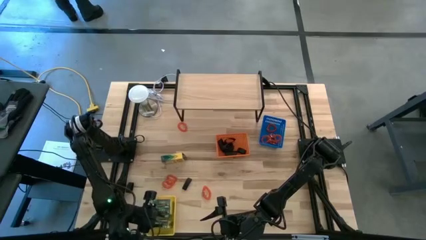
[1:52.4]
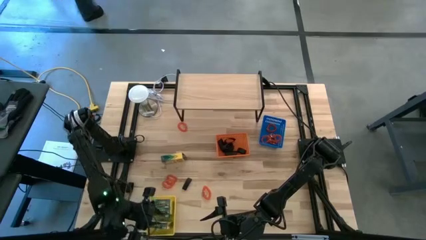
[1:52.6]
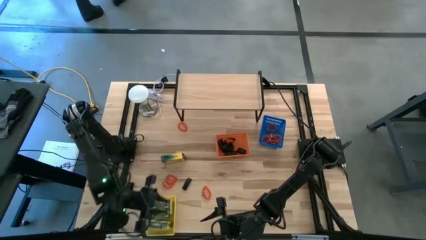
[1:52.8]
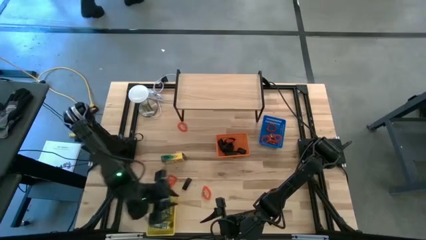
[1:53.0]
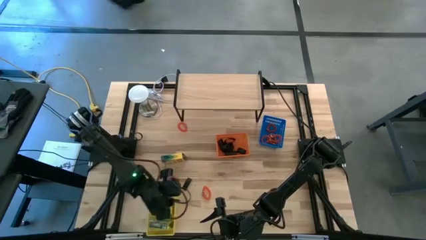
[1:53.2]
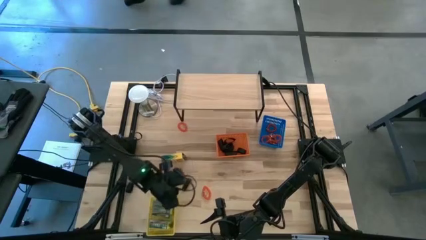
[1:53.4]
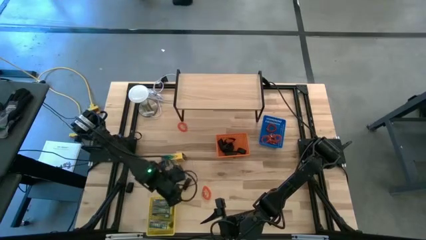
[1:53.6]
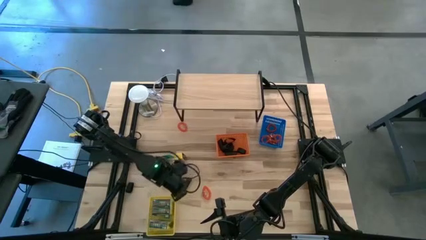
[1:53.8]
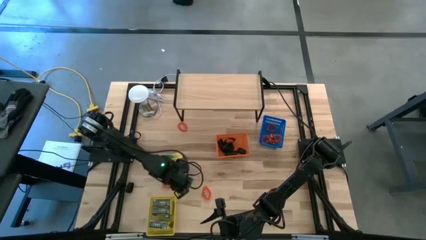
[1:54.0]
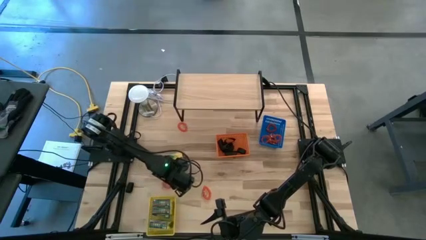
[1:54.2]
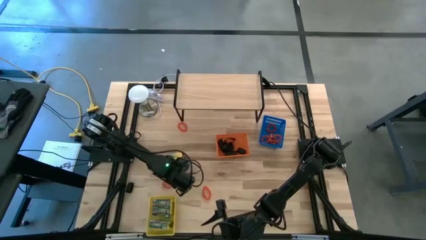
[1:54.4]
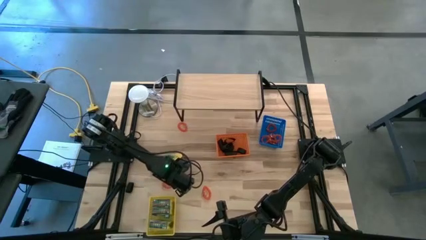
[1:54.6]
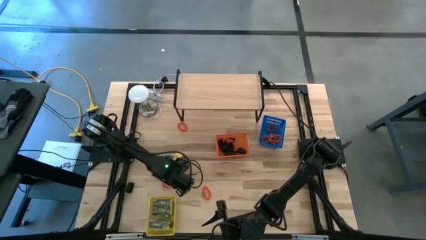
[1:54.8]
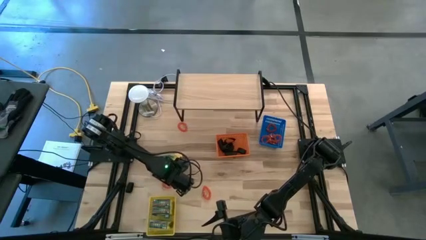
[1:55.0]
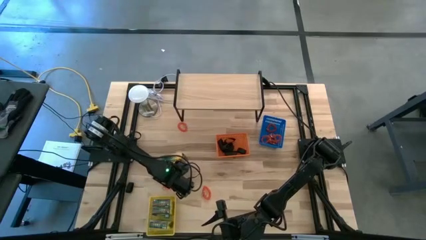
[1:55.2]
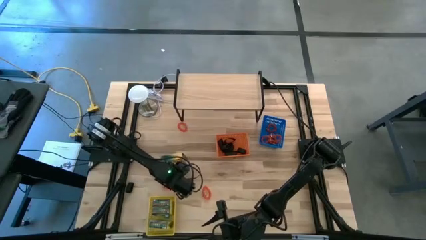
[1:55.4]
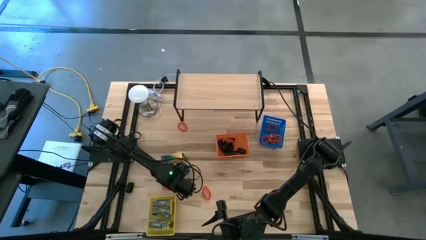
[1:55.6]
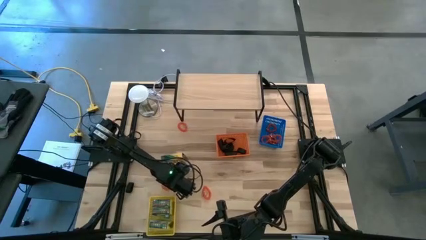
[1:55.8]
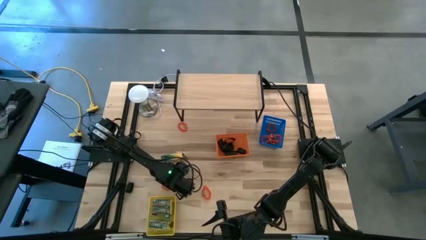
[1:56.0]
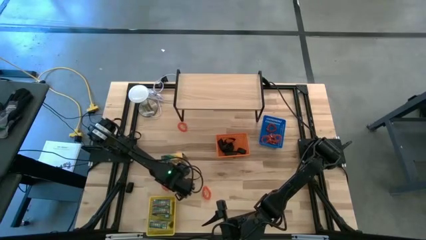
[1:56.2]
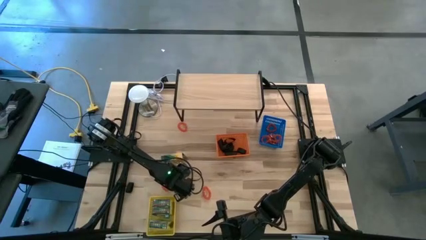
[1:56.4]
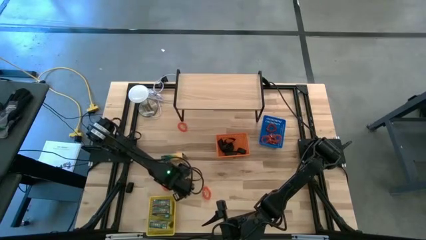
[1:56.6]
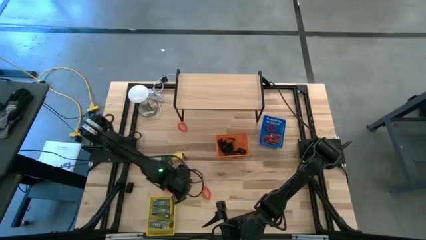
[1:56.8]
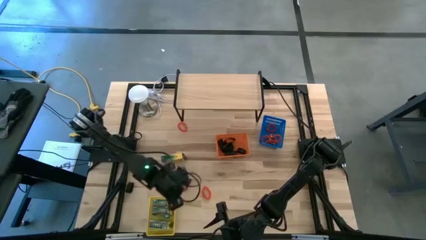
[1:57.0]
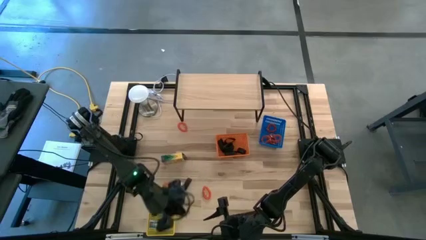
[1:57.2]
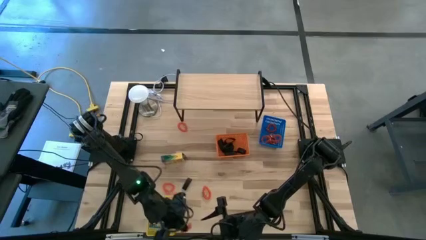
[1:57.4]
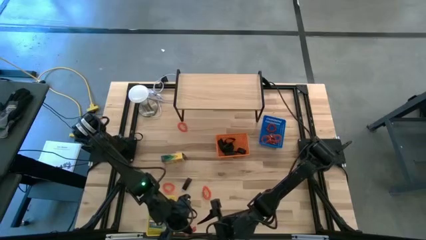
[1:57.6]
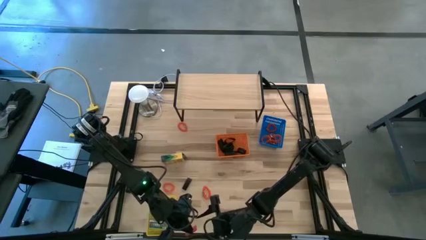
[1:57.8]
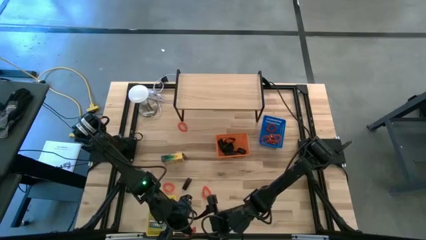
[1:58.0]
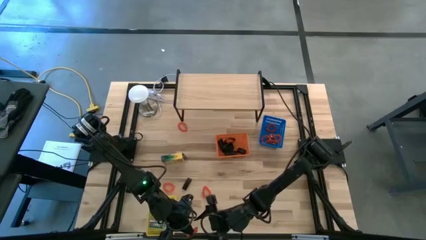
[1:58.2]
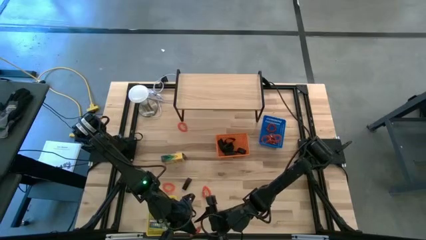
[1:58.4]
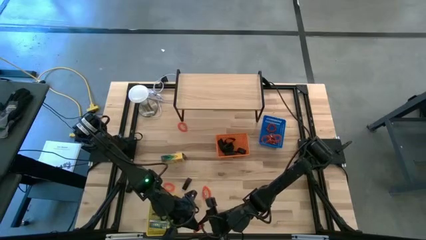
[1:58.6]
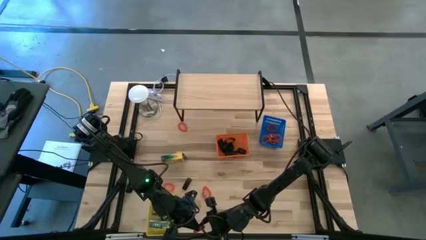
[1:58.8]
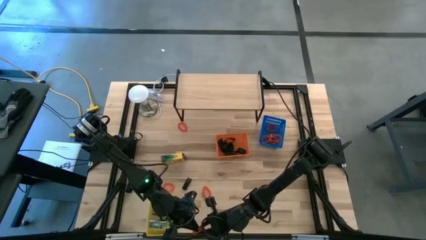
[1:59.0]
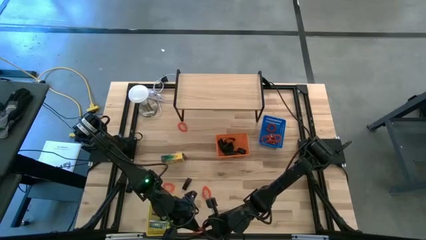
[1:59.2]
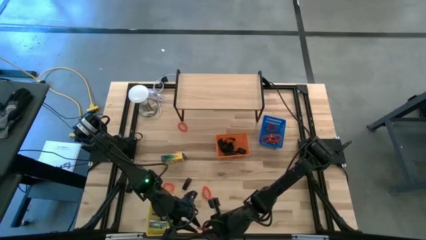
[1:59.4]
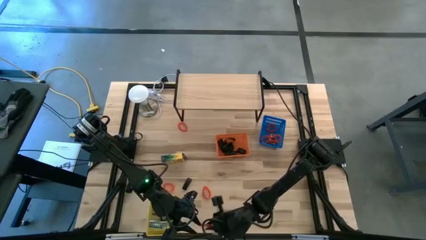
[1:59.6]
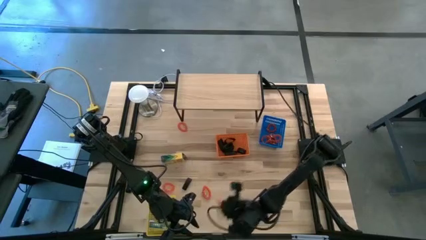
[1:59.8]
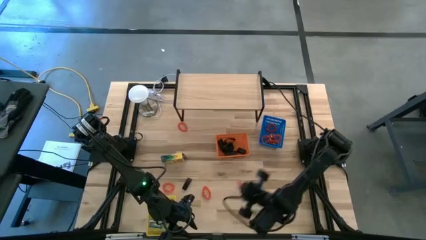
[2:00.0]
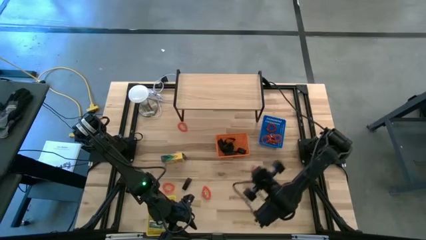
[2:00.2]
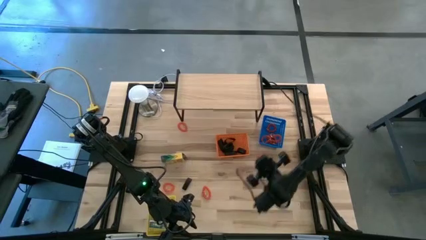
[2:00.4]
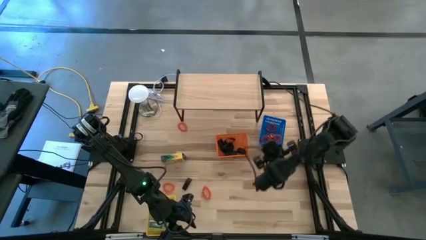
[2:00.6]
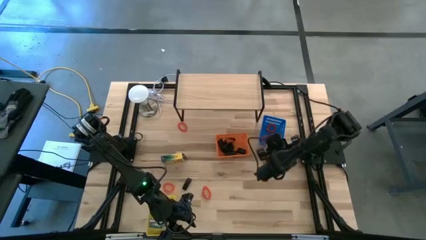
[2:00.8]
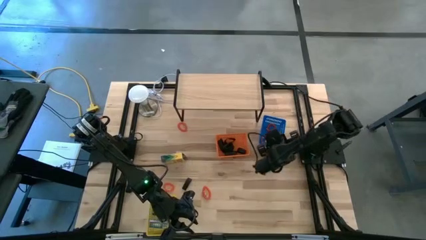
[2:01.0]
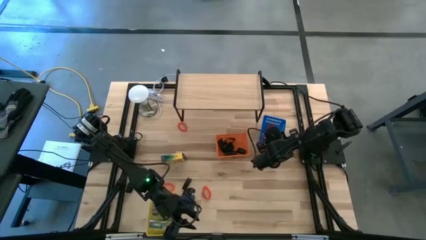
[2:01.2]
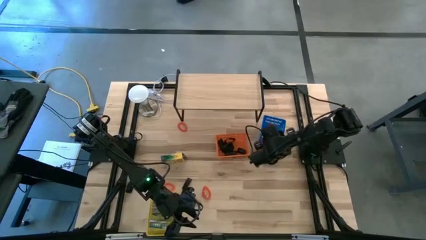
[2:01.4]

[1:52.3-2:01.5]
Task: Pick & Place Office Desk Supplies
Put the spring keychain into the blue bin

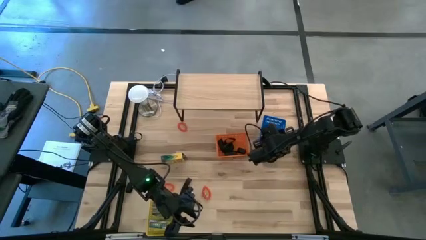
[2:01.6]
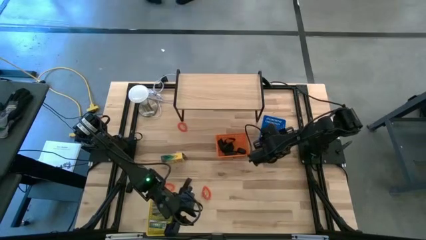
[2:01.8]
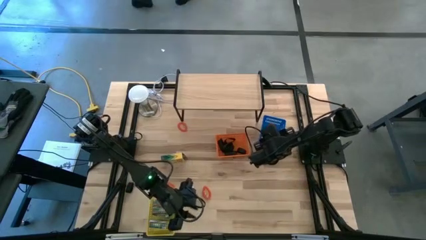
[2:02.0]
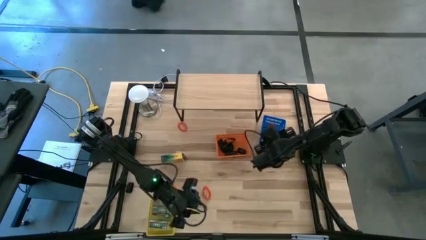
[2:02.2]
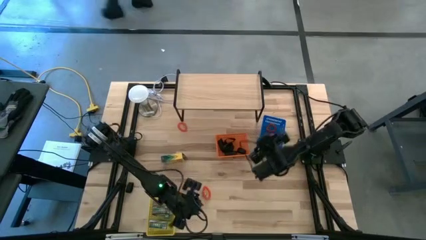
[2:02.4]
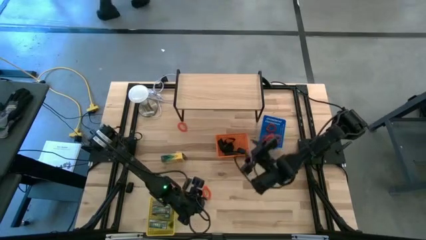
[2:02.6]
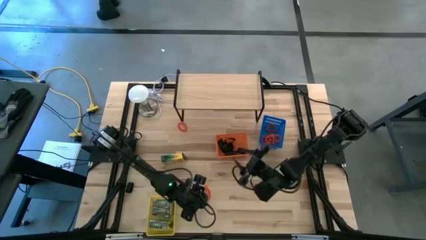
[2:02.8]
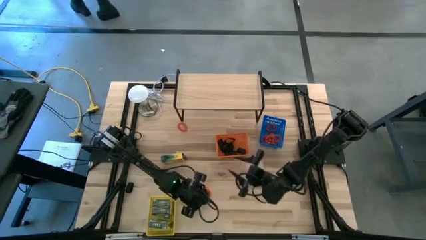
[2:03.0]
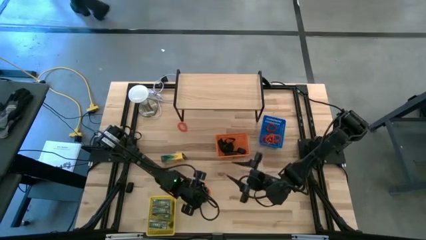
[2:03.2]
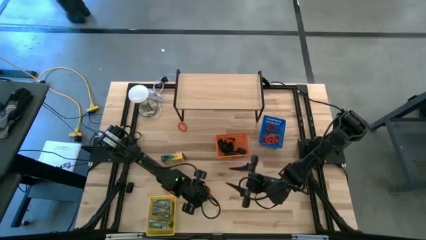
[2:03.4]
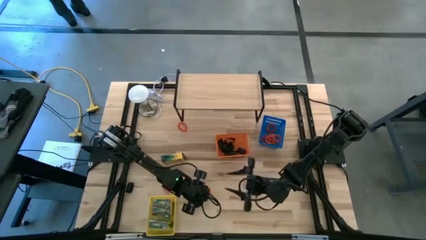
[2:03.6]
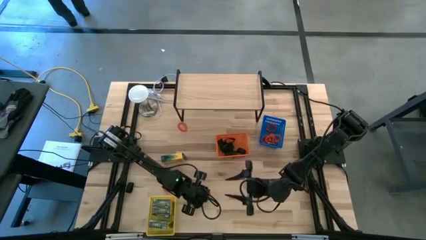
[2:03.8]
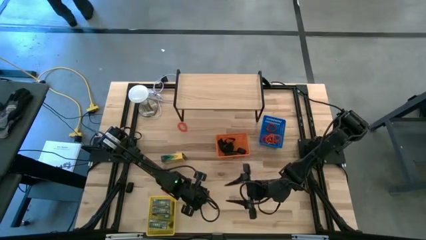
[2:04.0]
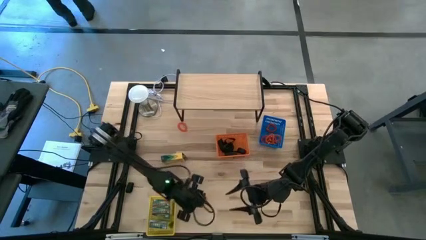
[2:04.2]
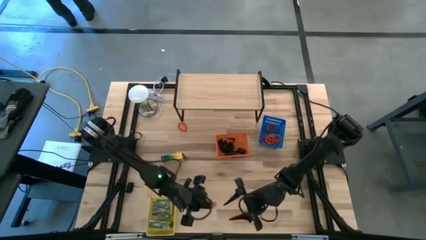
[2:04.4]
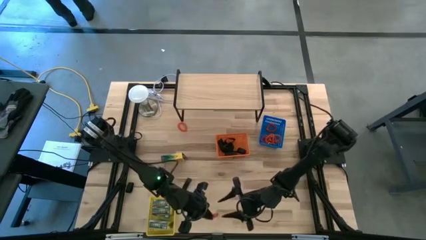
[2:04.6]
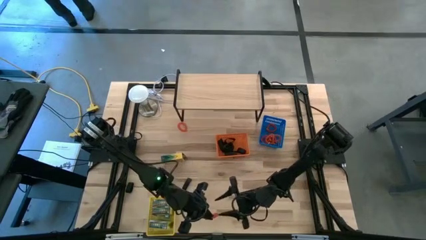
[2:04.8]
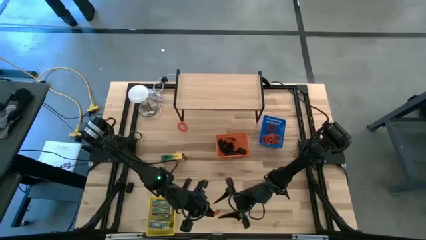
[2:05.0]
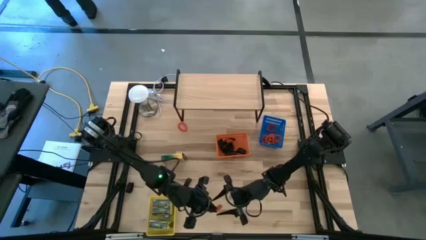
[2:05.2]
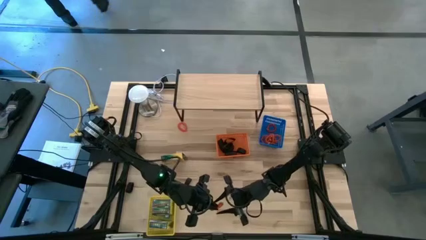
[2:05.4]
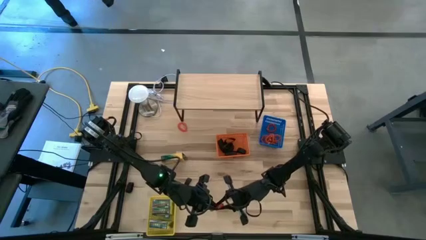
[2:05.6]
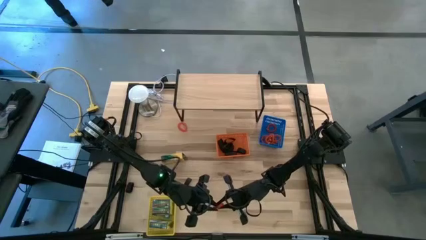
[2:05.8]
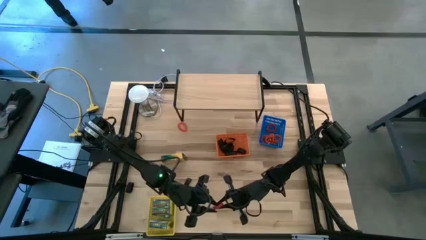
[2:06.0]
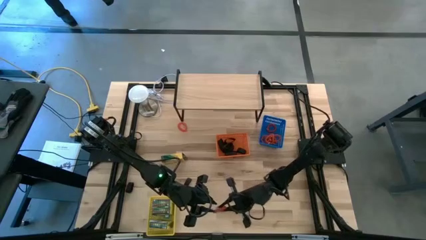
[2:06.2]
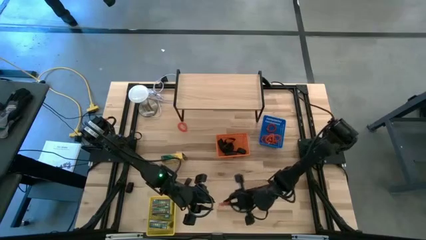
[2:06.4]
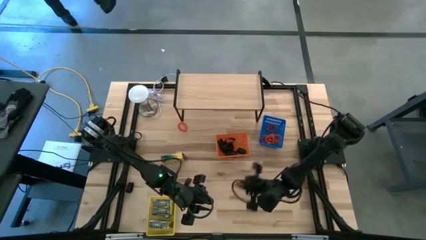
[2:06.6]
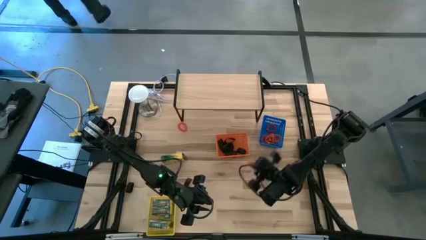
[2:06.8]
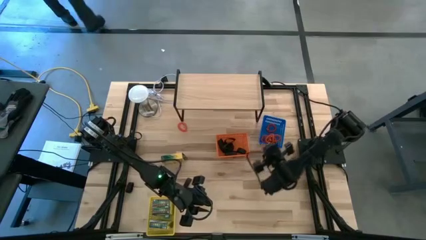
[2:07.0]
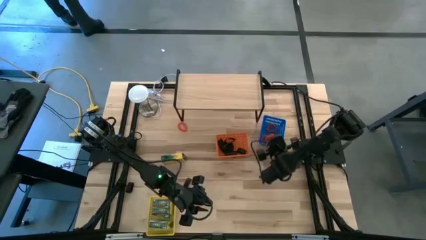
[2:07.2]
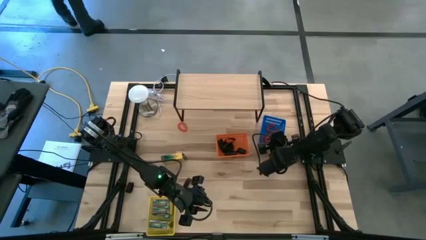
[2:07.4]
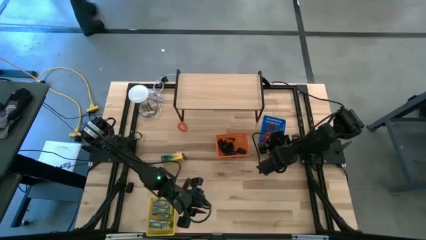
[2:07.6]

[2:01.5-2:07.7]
Put the spring keychain into the blue bin
